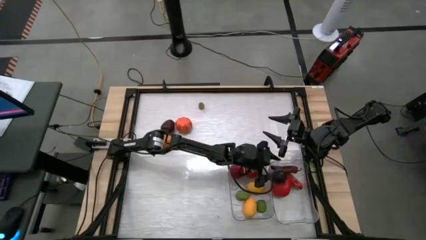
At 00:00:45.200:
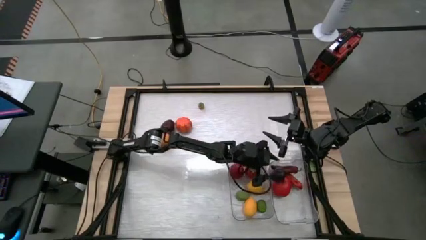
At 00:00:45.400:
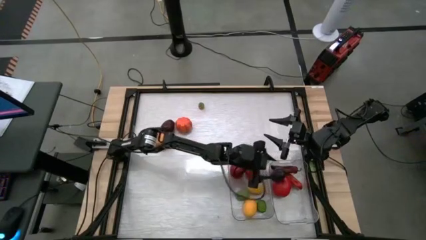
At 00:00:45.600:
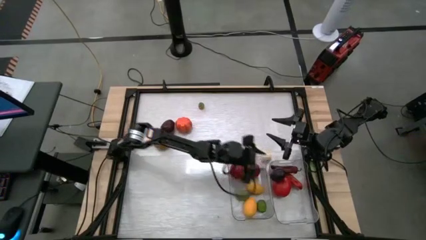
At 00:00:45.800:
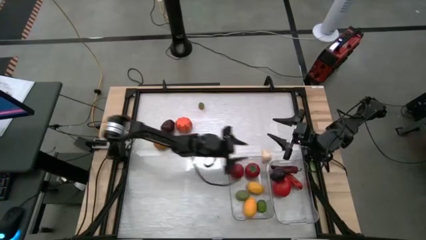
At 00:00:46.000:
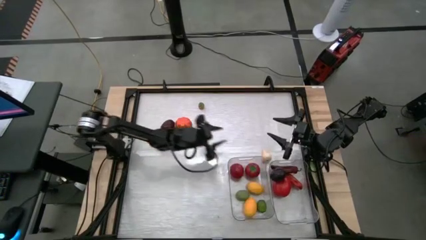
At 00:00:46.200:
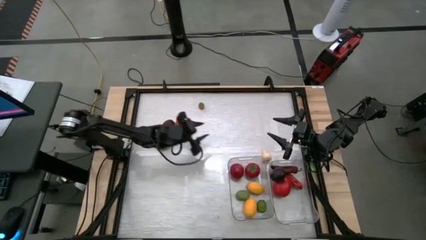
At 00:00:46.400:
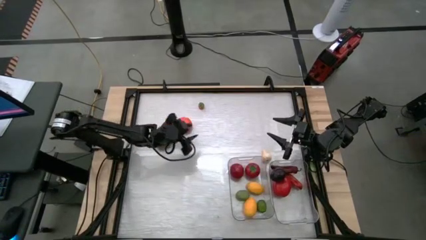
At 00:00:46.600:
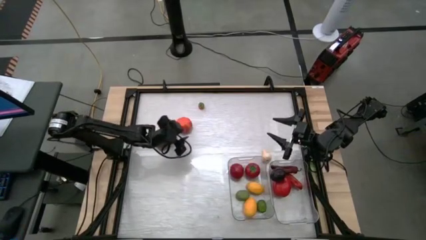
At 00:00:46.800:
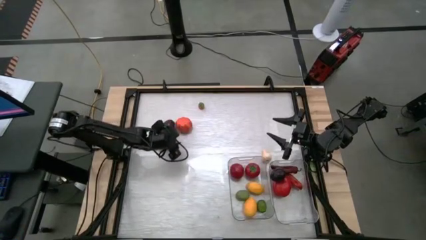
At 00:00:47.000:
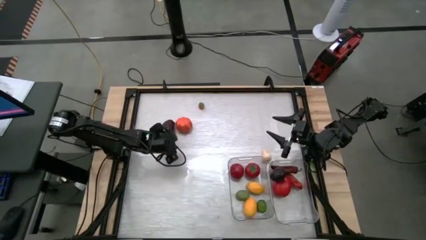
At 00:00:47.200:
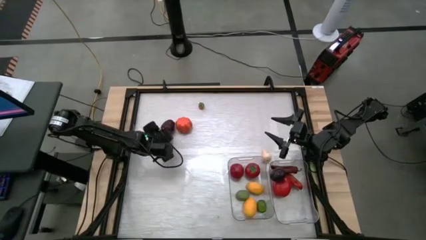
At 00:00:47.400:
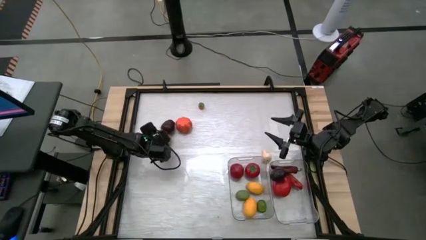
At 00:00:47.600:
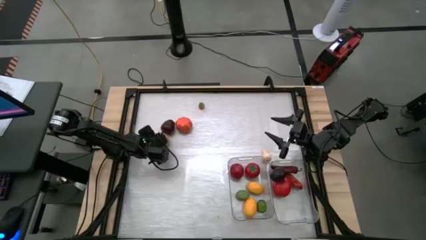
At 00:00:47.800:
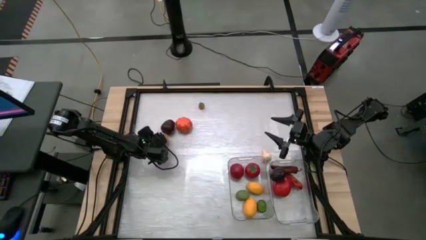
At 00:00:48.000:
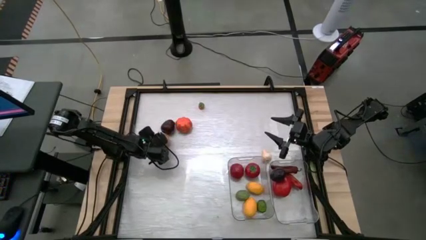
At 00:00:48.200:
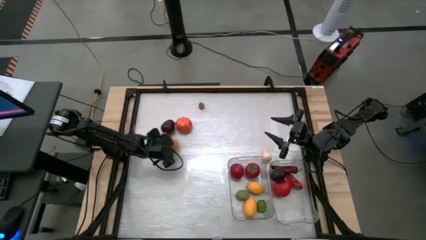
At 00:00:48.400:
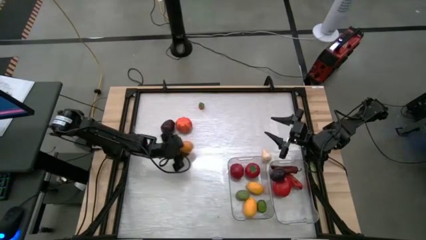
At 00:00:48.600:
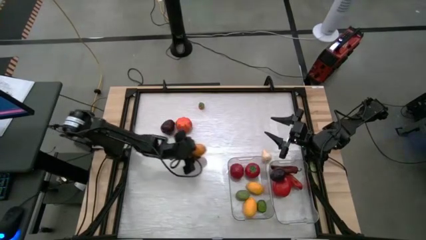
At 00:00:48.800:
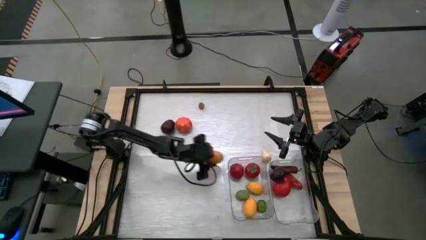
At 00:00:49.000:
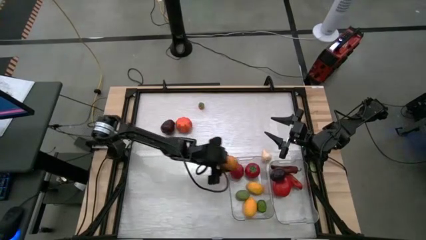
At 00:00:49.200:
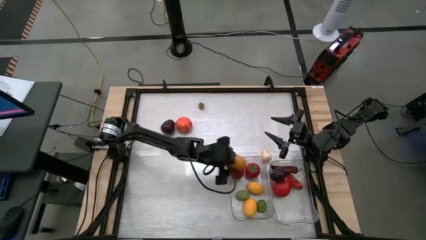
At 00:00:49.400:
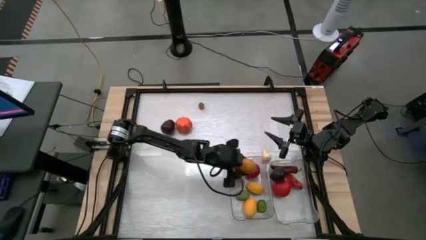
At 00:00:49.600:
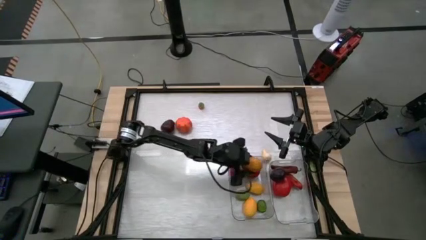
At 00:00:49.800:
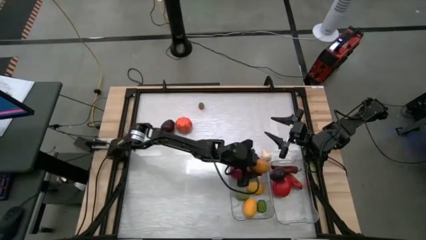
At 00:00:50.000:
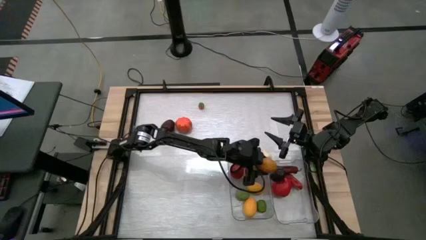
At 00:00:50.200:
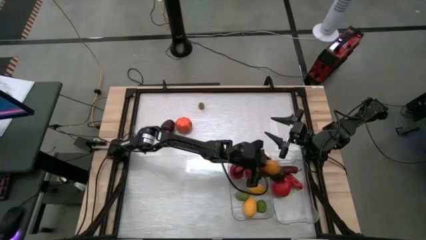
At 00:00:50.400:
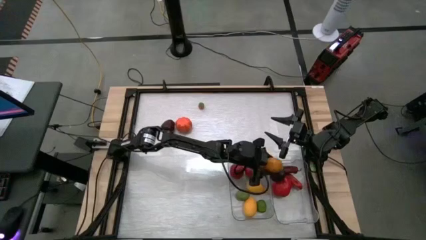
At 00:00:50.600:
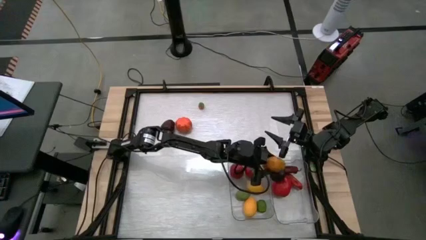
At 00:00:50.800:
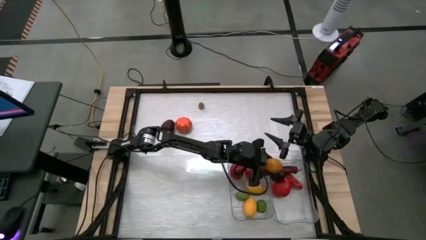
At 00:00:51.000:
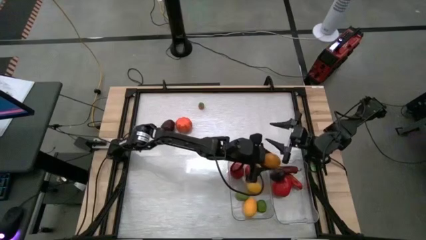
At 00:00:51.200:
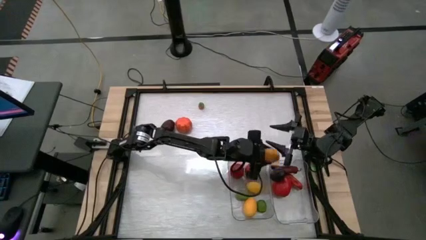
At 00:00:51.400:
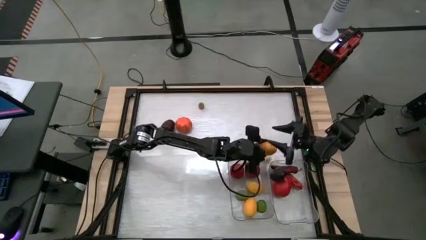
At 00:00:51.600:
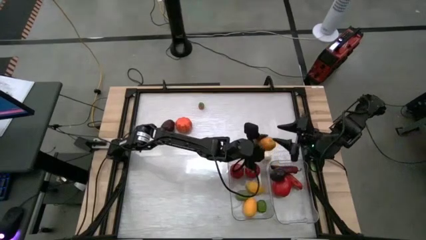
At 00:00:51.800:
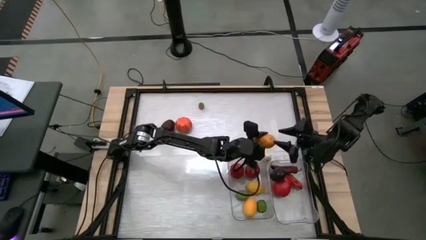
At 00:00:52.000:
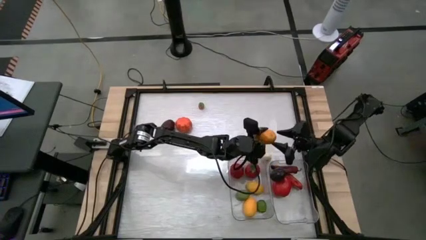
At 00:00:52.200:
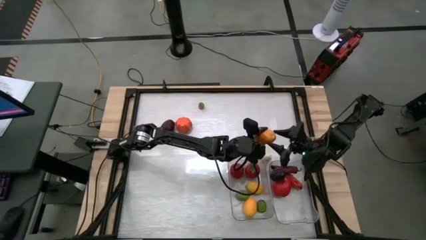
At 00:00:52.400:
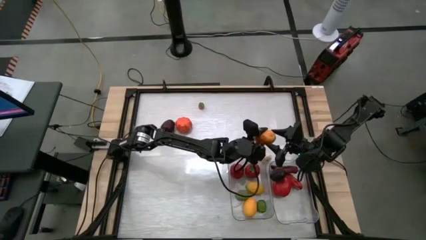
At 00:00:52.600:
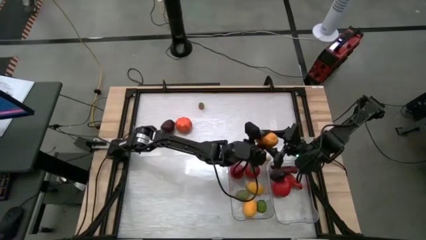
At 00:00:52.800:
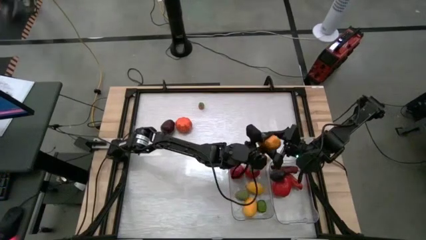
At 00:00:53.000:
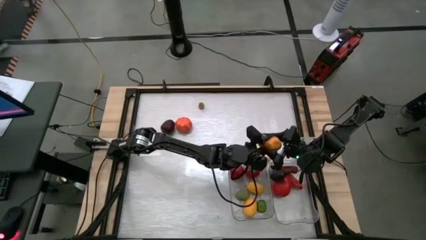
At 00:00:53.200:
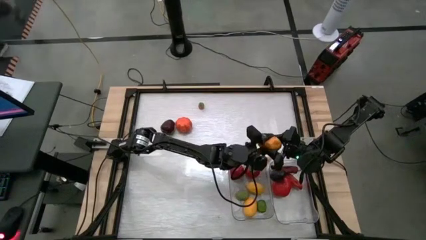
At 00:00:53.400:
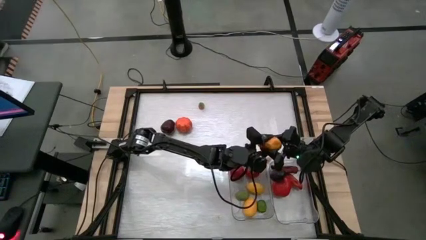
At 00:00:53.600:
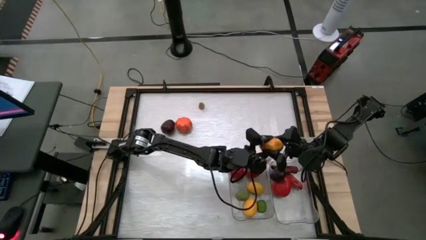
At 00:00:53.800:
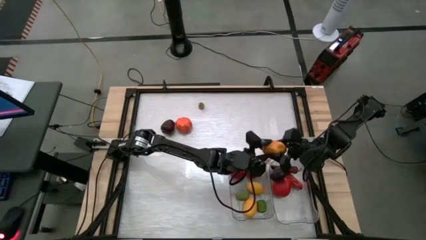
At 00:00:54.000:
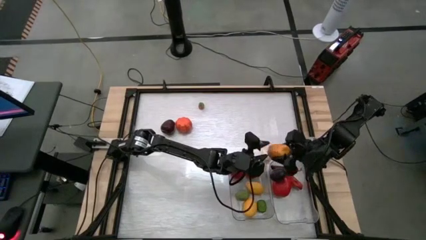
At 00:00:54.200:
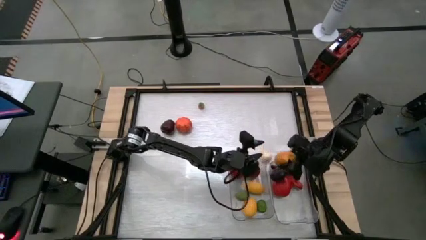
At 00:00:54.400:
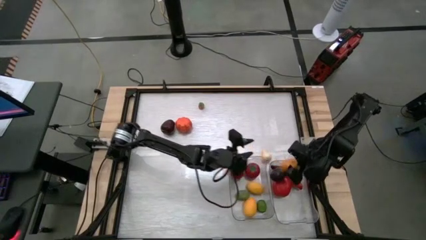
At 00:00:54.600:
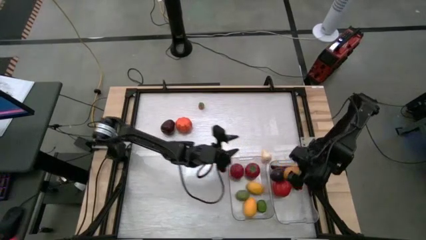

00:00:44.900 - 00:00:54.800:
Task: Sort produce into baskets
Put the potato into the right transparent bin

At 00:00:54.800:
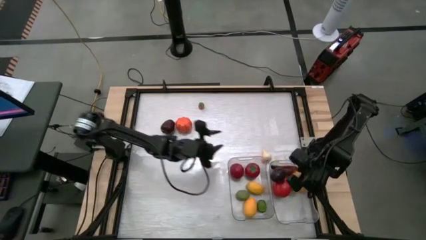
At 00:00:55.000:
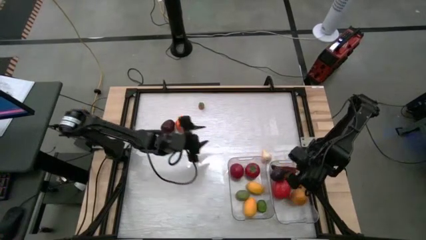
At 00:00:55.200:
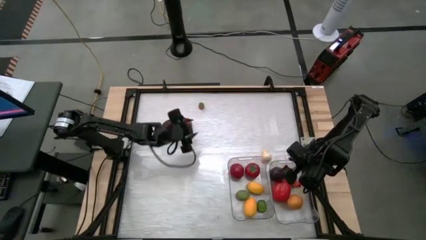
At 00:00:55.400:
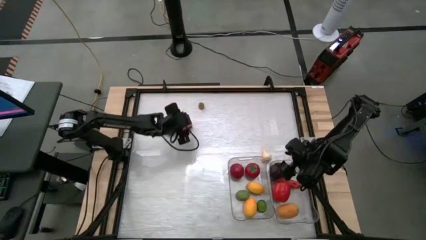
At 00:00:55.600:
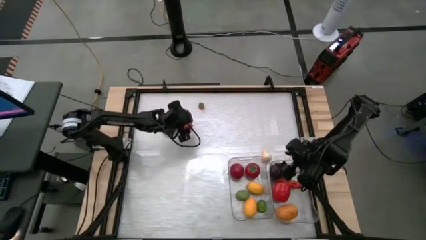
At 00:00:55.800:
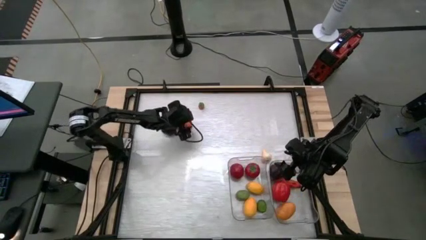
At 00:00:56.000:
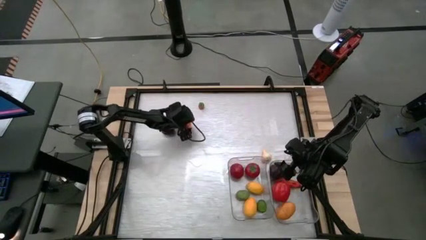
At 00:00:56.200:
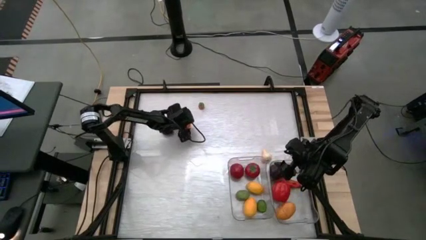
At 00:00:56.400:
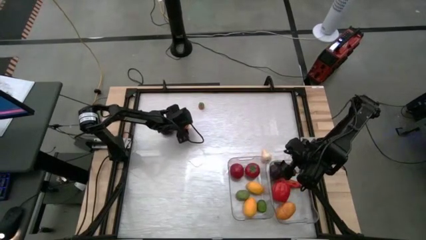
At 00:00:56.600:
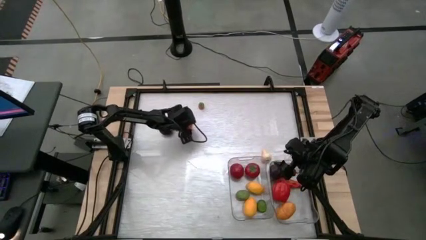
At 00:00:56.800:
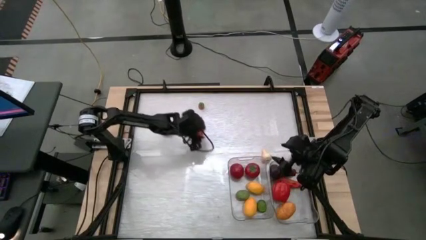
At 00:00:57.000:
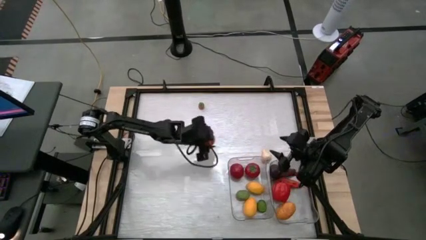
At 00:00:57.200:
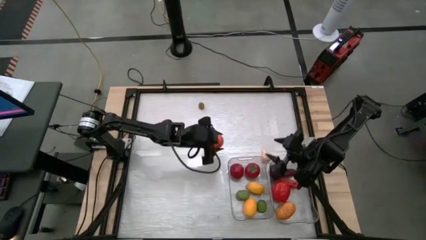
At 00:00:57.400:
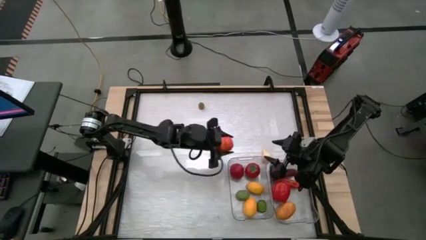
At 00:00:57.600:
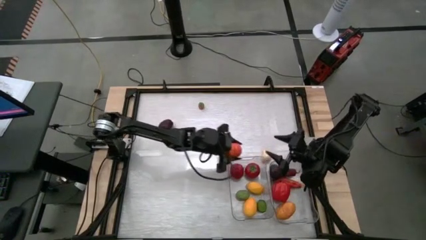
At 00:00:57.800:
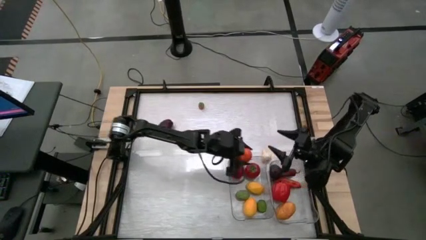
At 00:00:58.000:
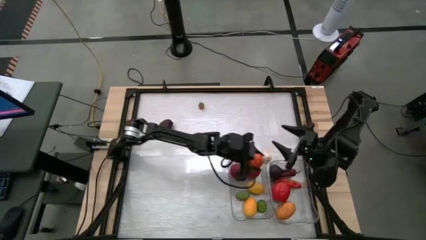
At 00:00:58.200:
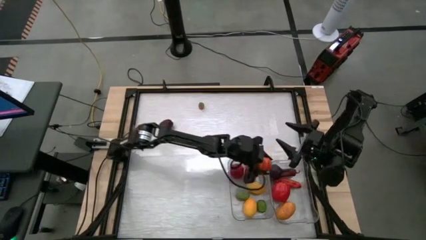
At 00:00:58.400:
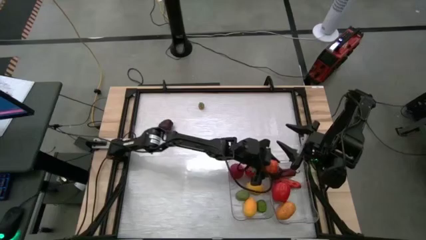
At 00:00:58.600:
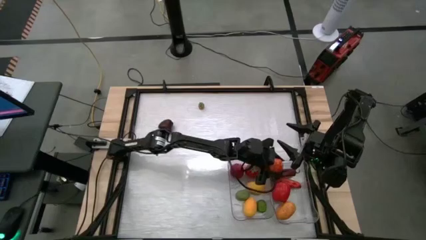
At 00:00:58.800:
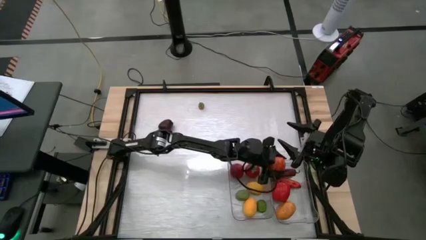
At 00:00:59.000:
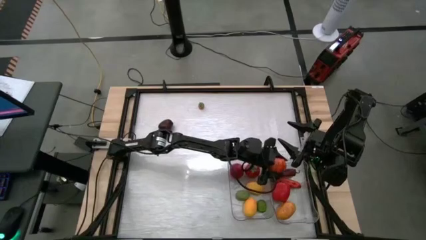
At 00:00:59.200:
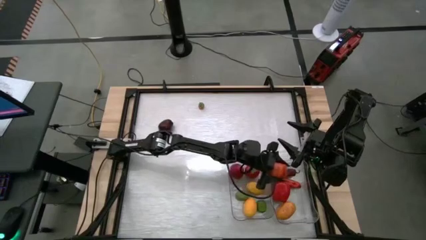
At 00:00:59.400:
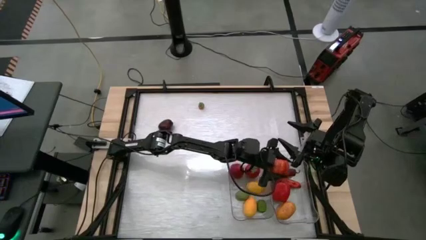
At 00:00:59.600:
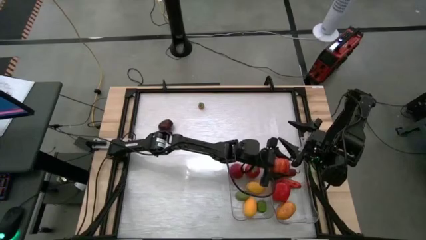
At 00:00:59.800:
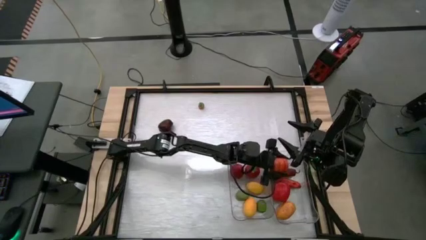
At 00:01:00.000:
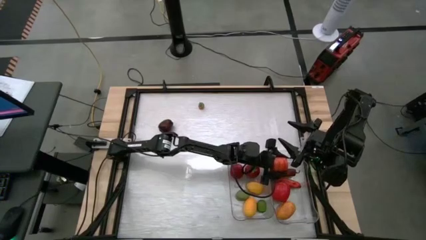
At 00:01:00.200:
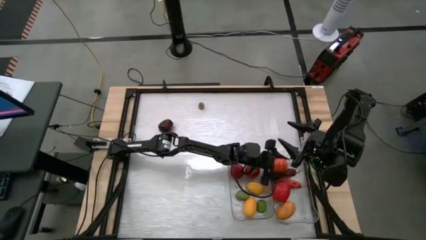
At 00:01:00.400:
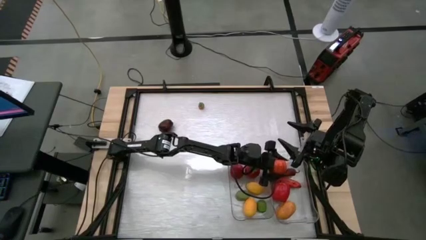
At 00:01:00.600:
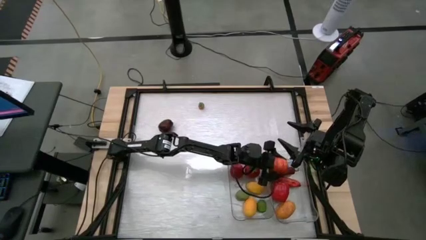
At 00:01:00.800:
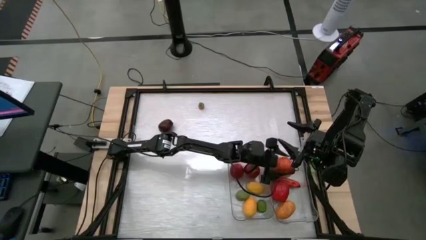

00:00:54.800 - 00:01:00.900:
Put the pumpkin into the right transparent bin
